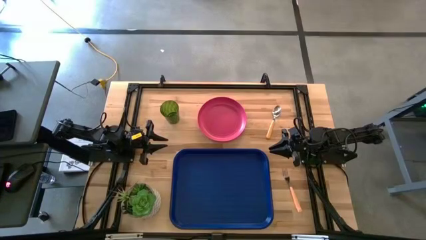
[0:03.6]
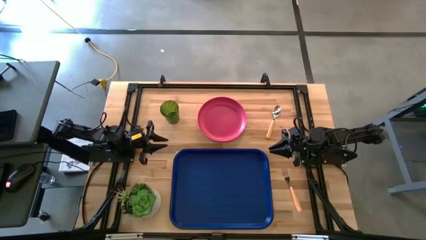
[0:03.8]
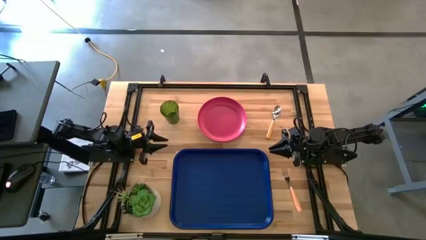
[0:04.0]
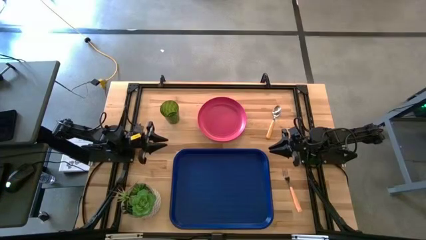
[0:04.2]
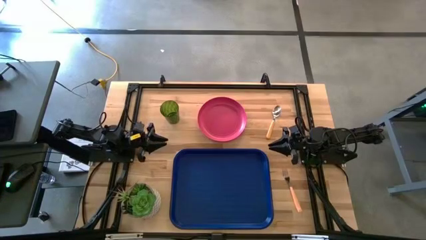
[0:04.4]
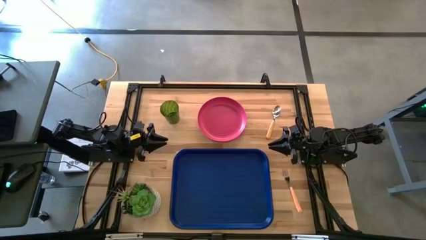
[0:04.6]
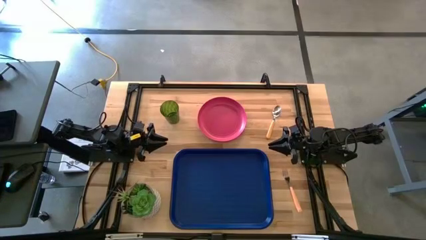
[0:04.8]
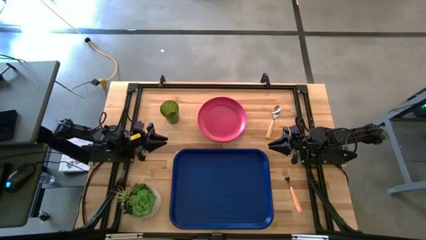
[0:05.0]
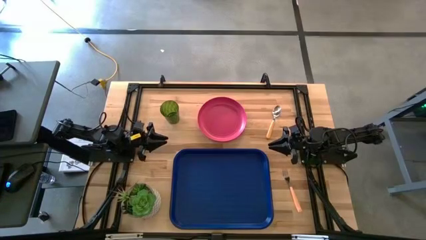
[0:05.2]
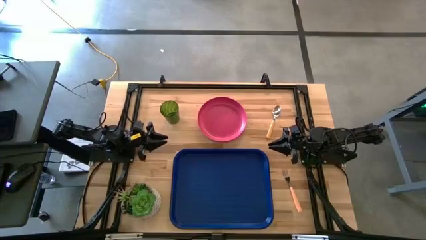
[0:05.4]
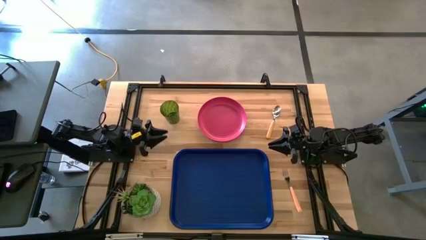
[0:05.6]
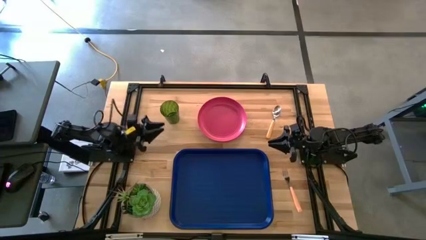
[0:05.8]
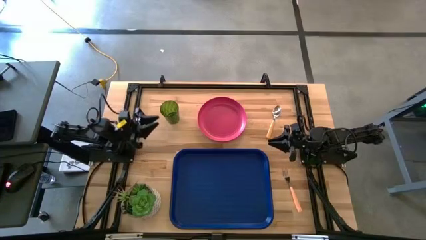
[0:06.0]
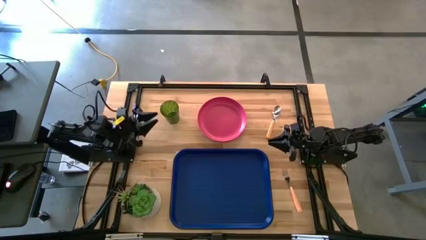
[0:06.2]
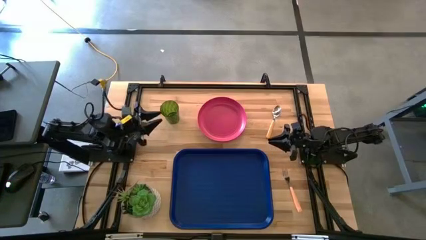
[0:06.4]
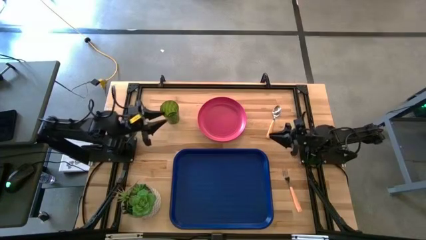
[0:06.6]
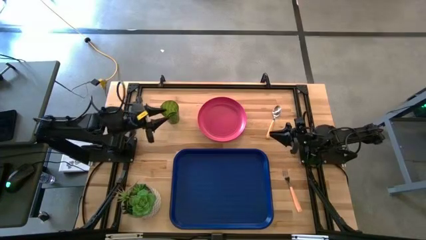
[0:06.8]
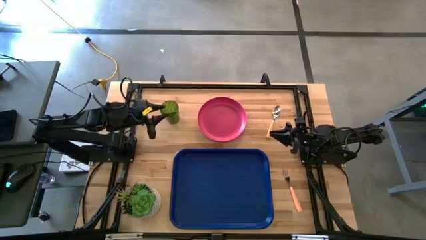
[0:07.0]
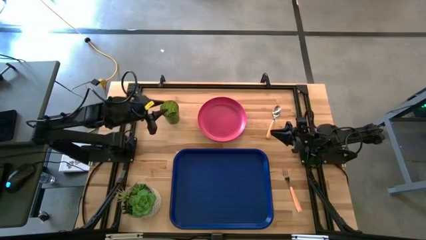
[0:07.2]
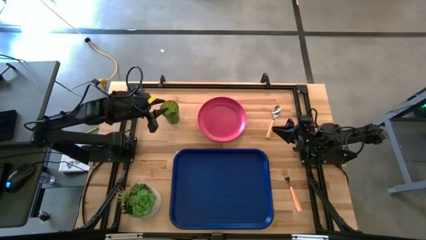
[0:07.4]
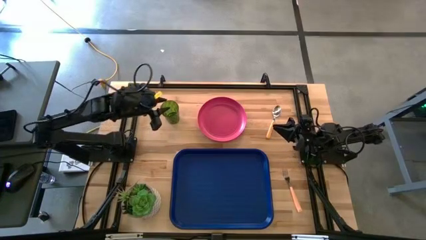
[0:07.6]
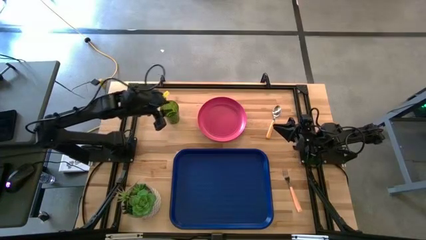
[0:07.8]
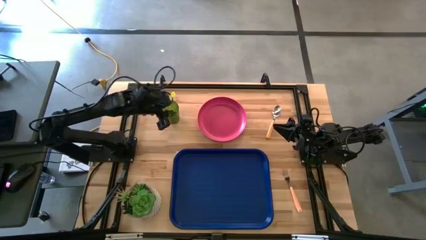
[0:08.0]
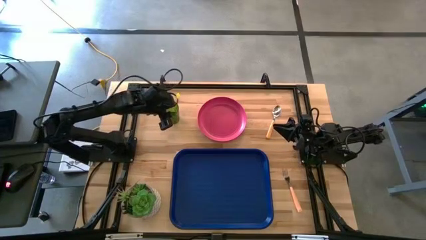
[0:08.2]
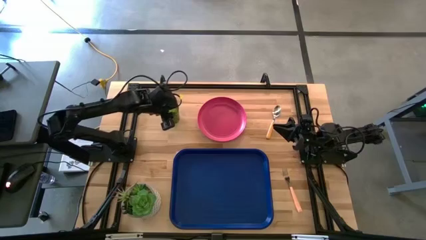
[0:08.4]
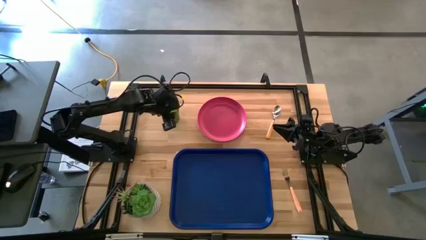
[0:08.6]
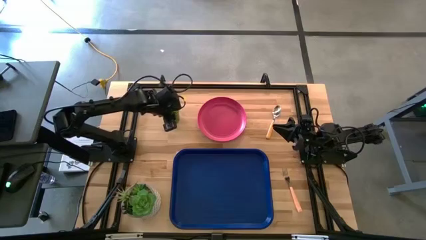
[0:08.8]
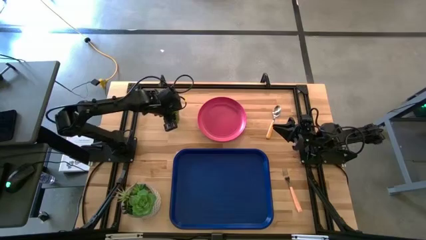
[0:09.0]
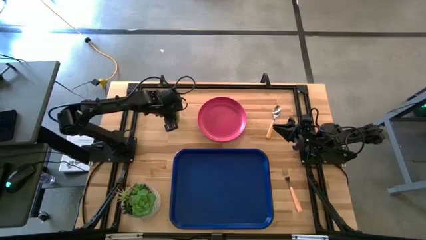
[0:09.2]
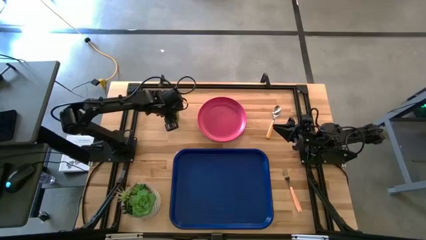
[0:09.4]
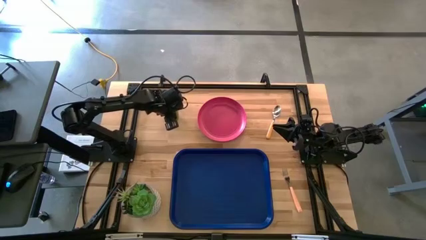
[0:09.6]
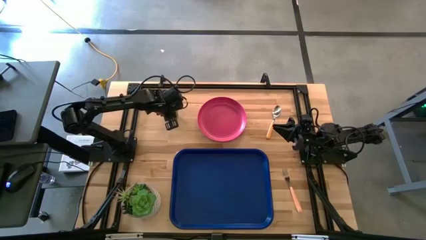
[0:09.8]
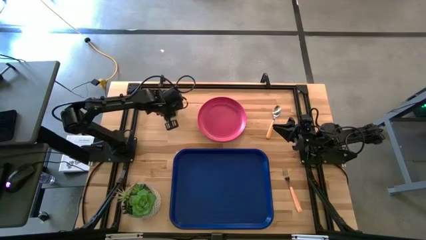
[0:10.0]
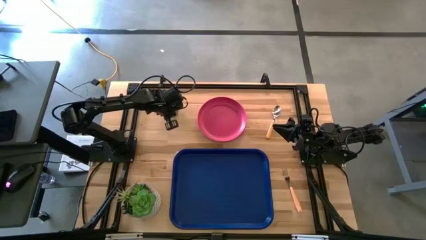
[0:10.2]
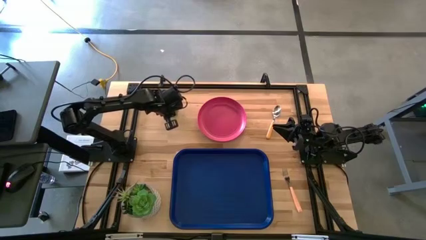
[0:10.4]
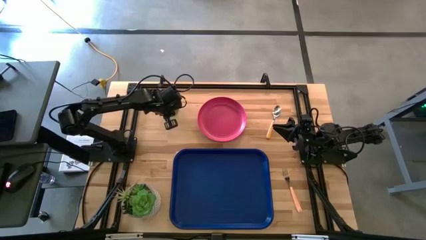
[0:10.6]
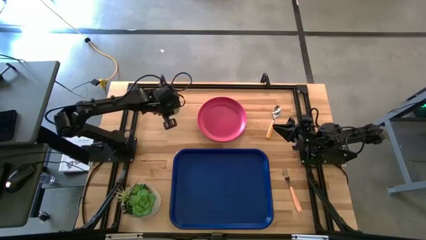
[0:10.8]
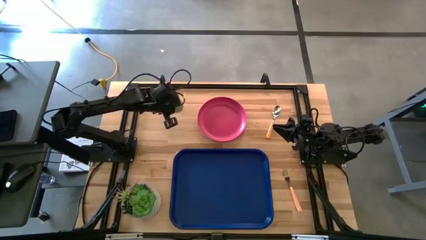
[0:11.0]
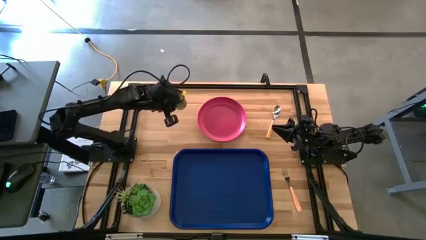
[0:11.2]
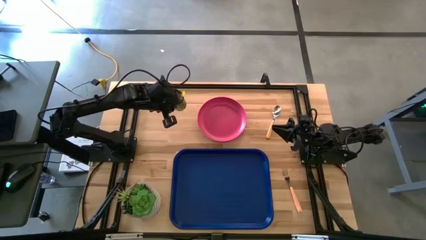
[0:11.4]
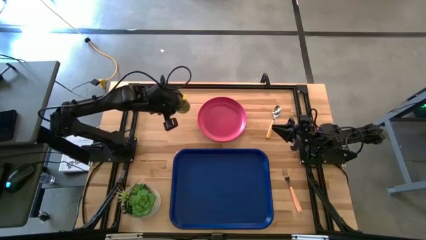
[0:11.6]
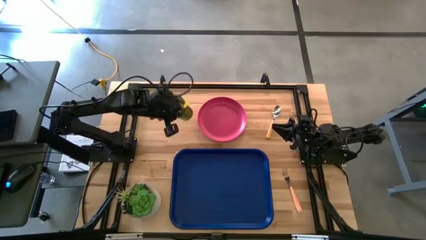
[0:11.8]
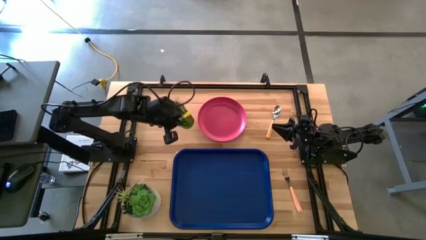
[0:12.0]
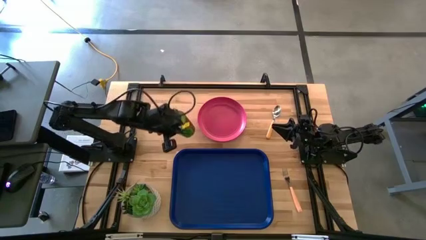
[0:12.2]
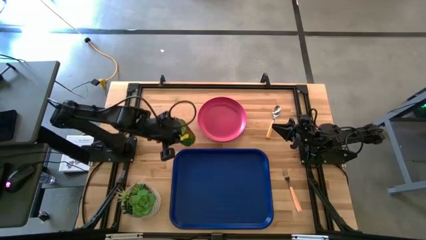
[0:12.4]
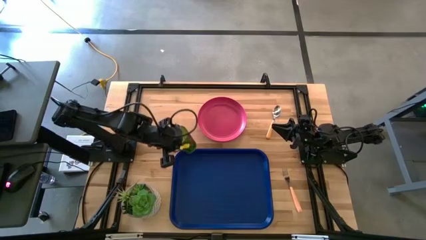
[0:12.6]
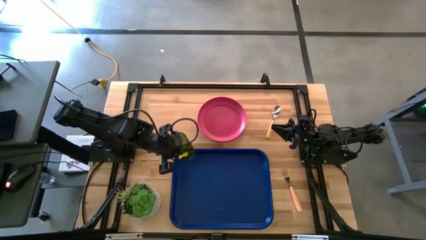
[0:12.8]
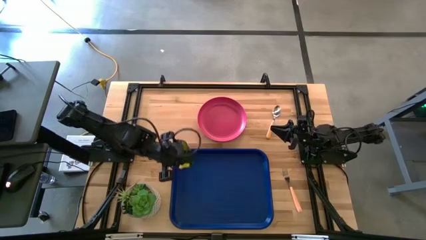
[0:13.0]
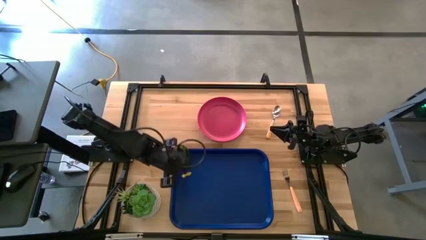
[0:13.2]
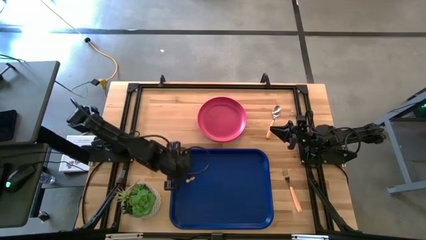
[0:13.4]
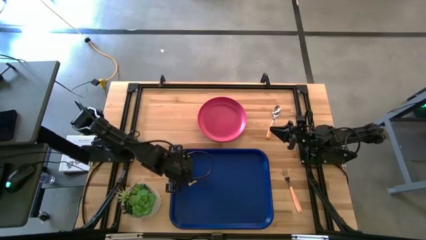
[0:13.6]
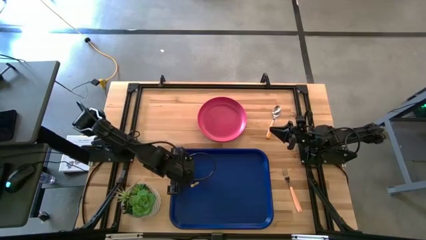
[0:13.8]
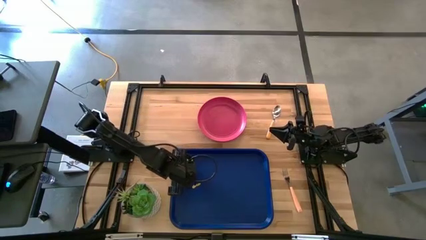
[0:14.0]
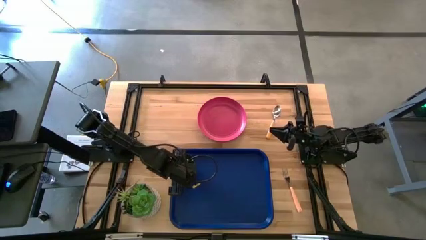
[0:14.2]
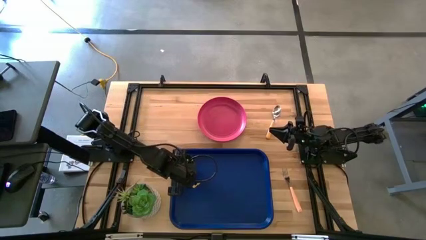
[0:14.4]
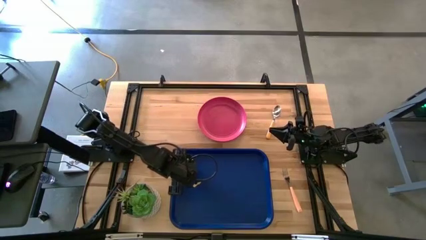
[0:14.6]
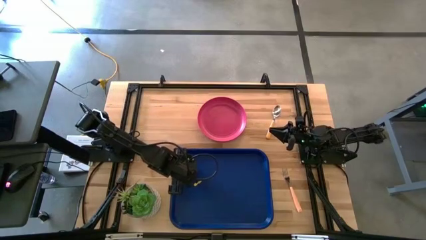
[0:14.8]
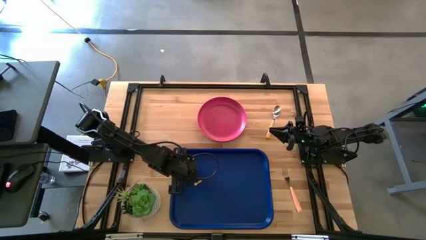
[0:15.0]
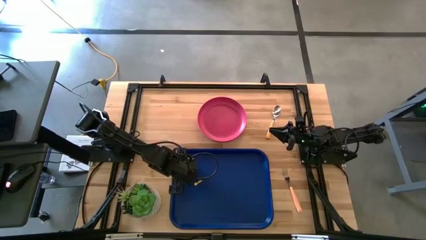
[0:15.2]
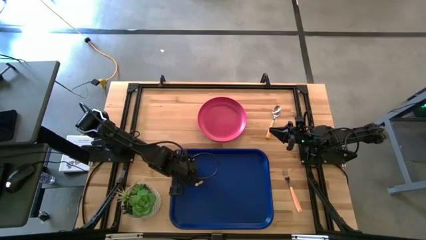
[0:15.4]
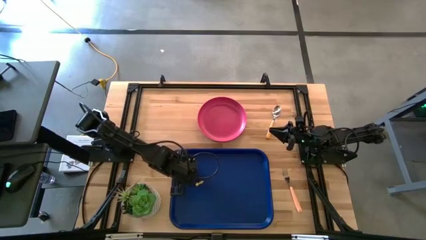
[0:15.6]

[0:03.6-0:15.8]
Task: Pick and place plate/cup/fork/spoon on tray
Put the green cup on the blue serving tray

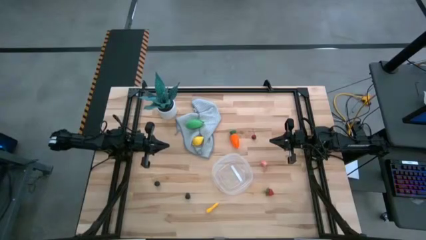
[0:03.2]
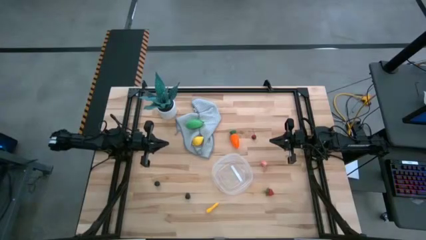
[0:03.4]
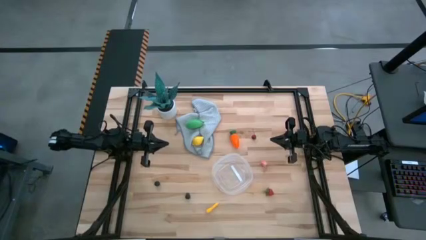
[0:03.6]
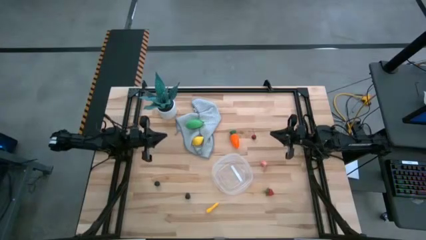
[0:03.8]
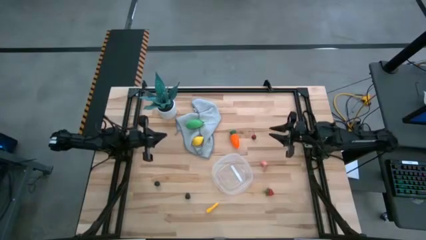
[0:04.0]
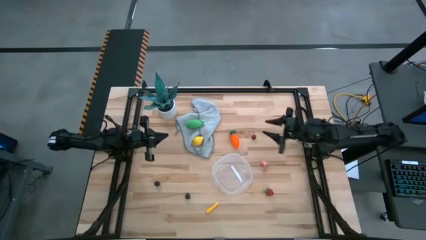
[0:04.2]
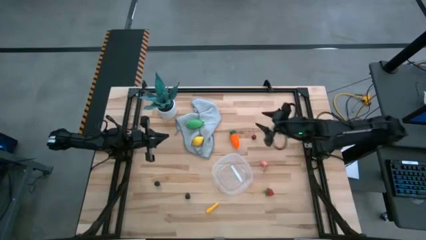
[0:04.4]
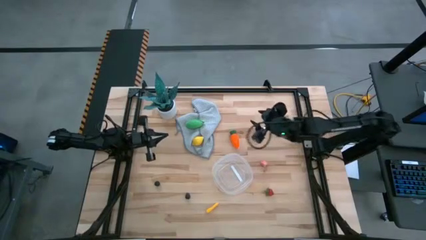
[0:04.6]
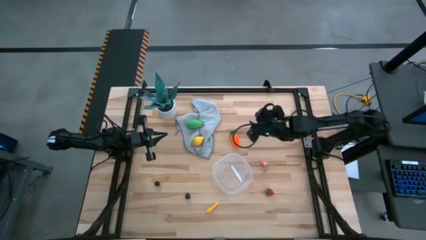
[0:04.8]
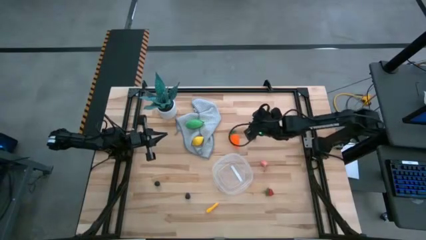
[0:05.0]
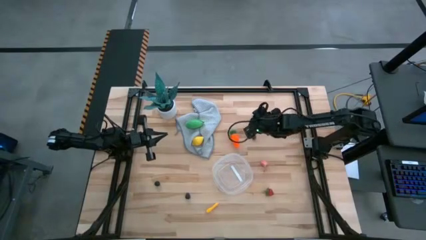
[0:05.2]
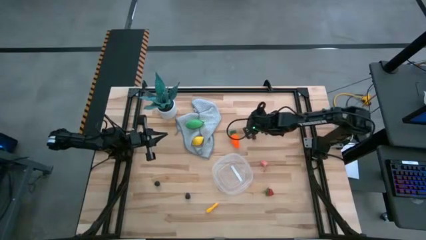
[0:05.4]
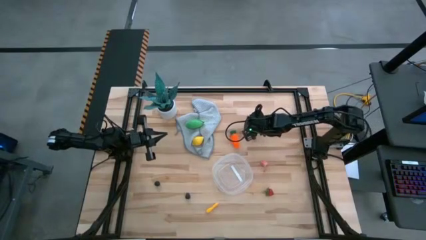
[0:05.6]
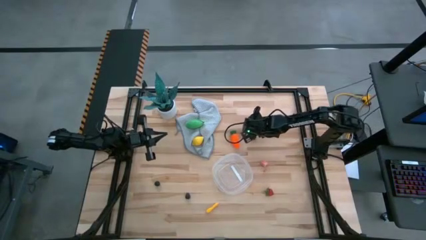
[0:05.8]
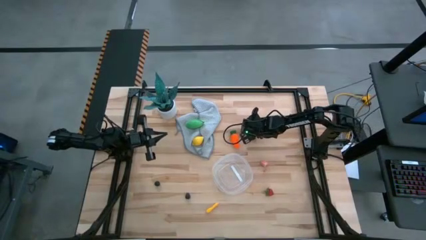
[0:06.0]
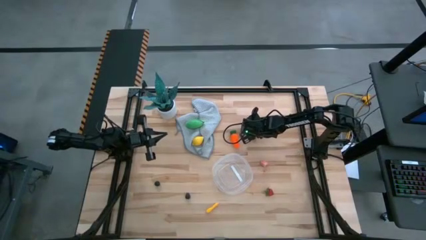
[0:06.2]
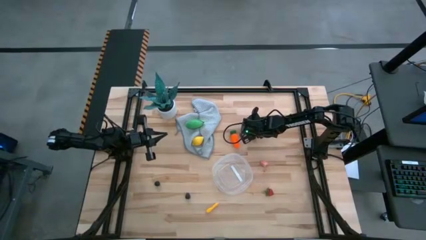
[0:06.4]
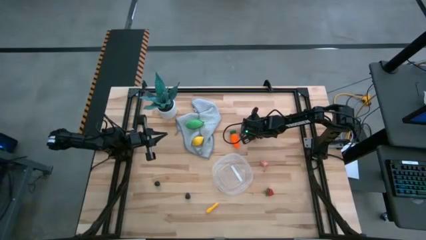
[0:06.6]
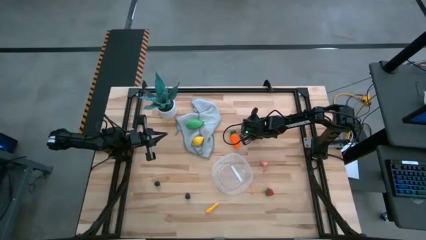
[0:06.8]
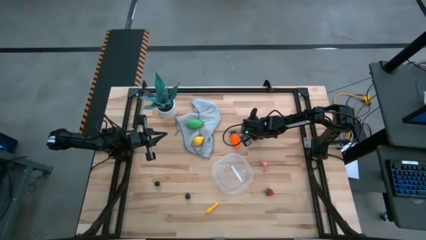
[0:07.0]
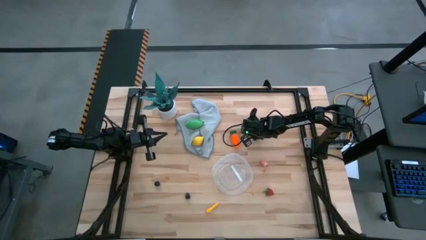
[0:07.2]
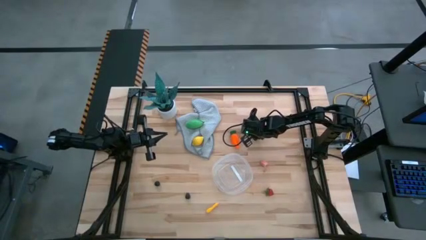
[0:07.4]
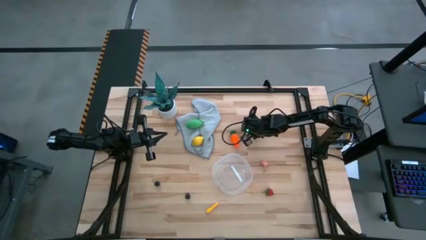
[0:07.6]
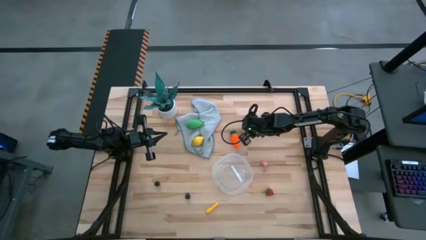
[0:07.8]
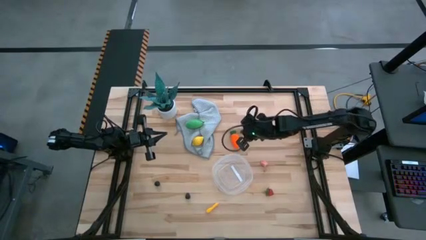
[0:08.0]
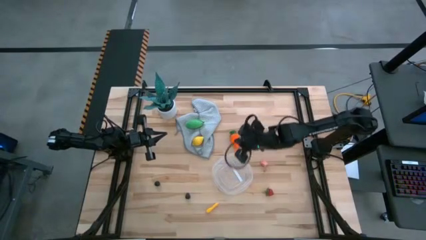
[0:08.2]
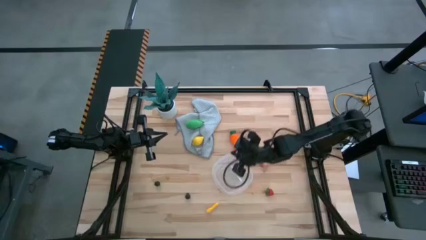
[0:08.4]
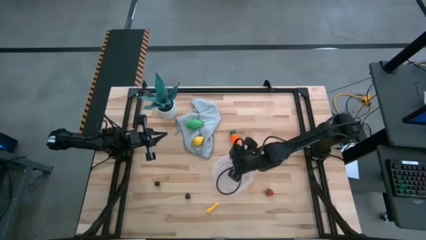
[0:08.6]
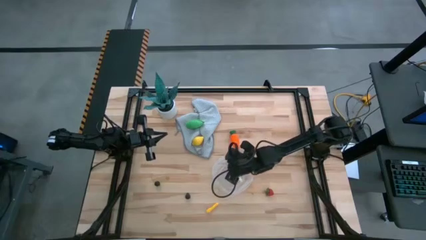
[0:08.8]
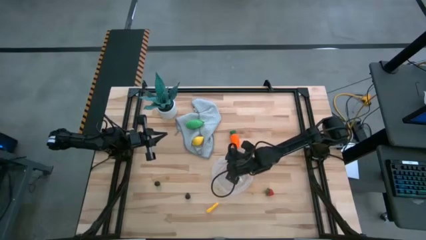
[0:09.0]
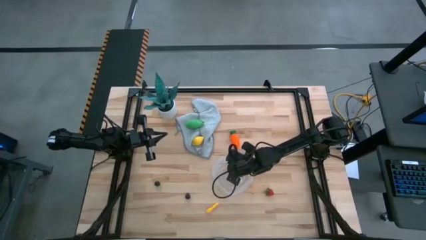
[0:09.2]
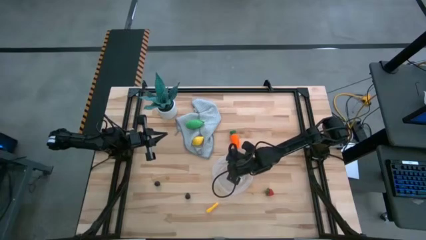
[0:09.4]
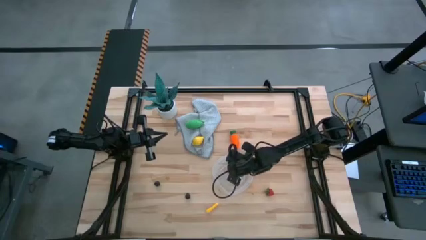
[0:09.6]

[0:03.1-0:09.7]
Task: Pick and placing Produce into tupperware
Put the red cherry into the transparent bin
